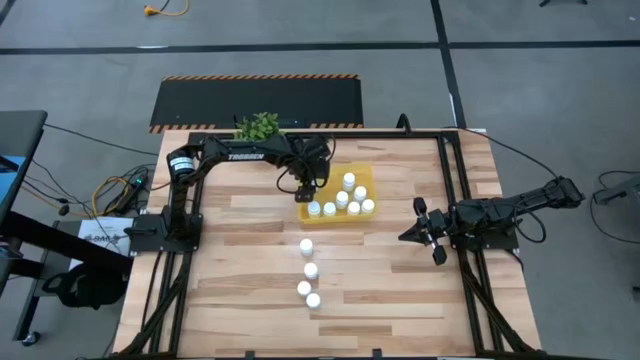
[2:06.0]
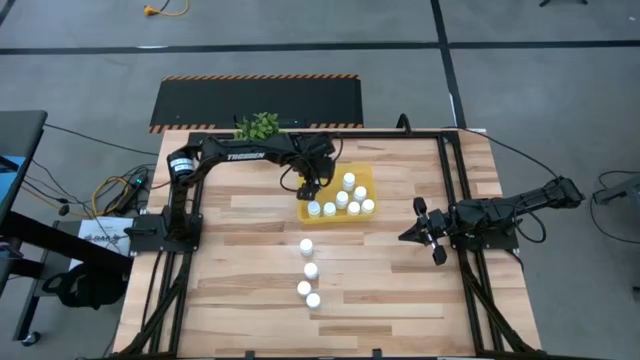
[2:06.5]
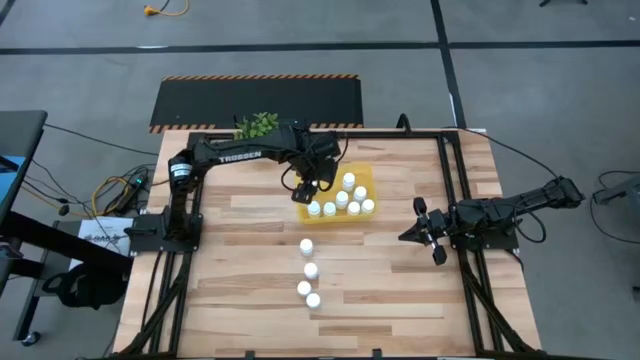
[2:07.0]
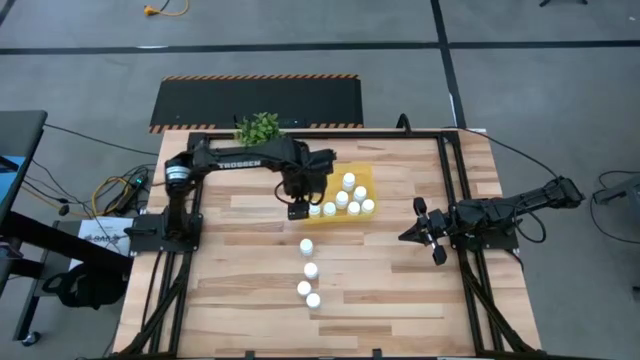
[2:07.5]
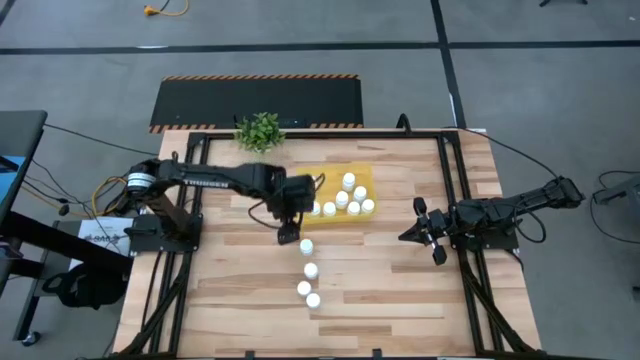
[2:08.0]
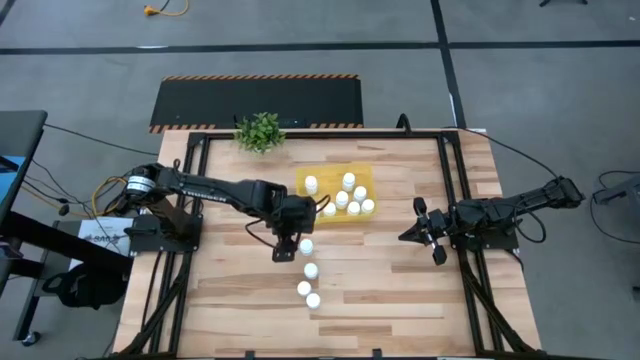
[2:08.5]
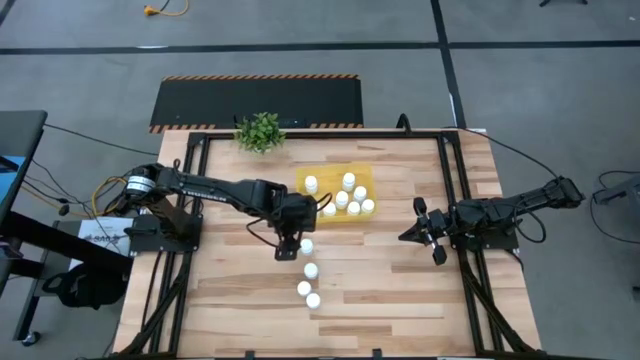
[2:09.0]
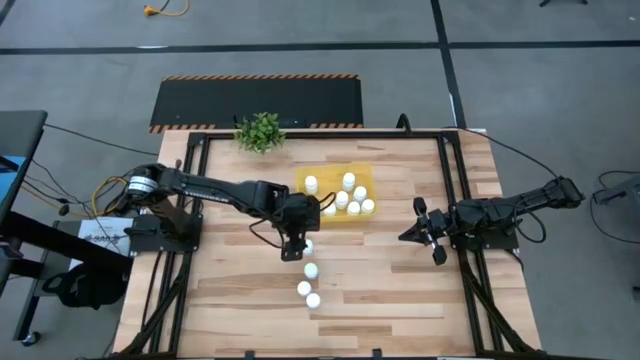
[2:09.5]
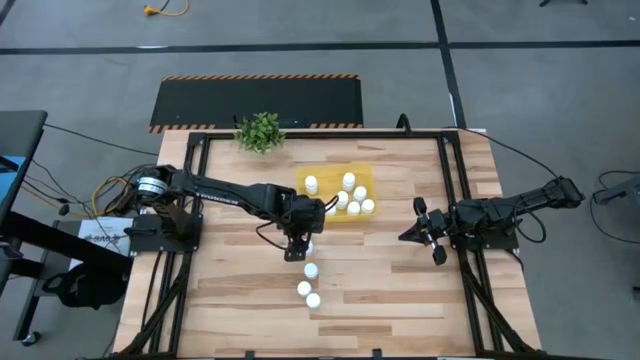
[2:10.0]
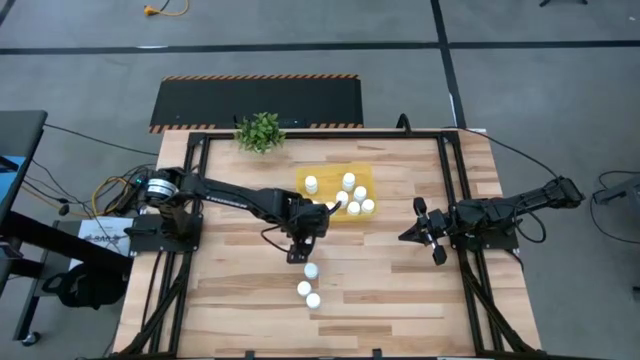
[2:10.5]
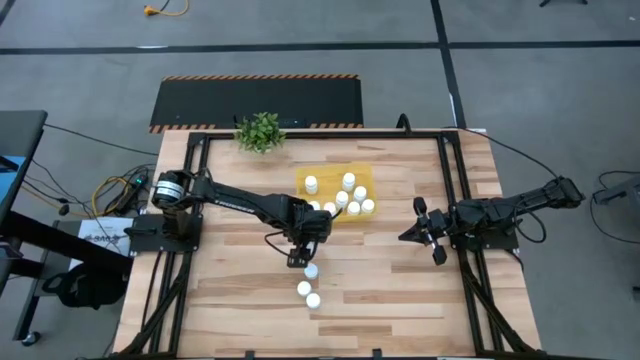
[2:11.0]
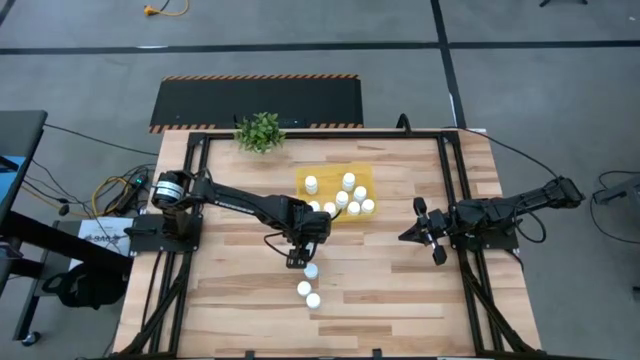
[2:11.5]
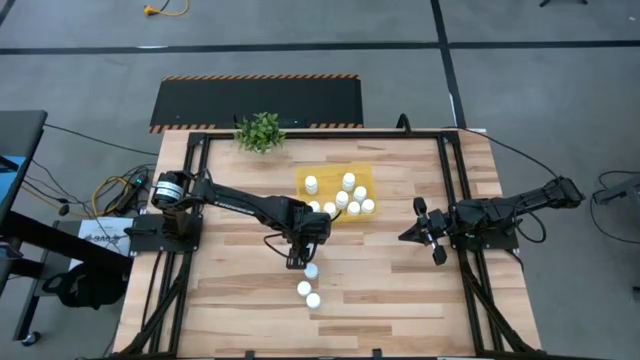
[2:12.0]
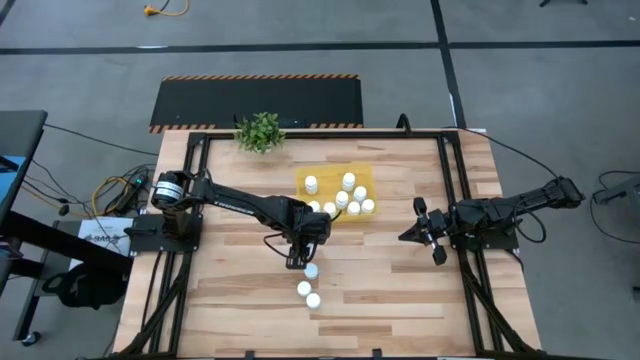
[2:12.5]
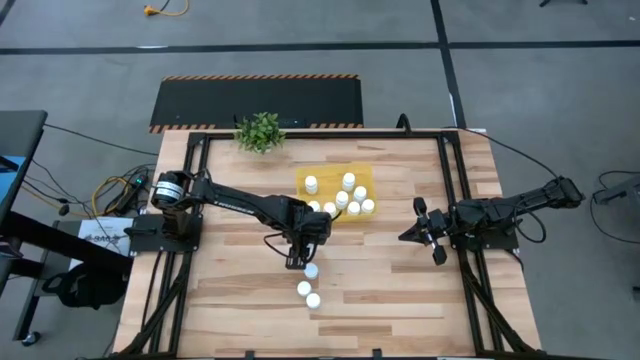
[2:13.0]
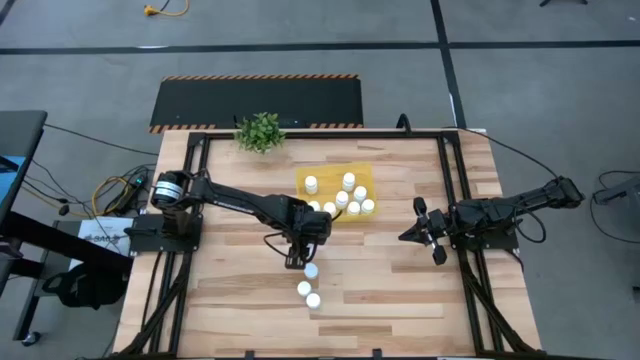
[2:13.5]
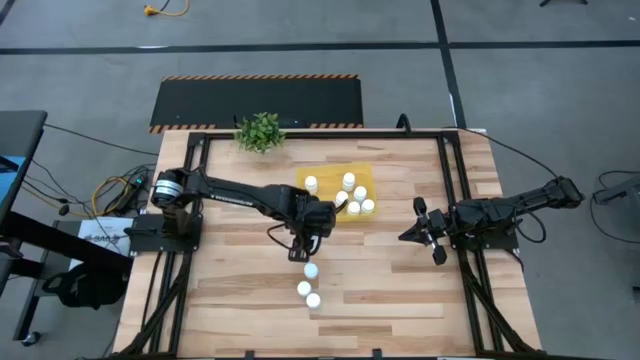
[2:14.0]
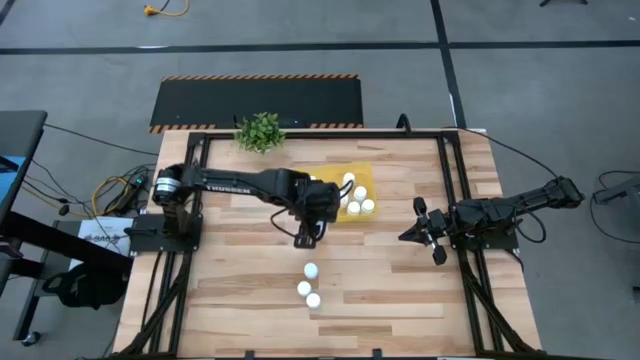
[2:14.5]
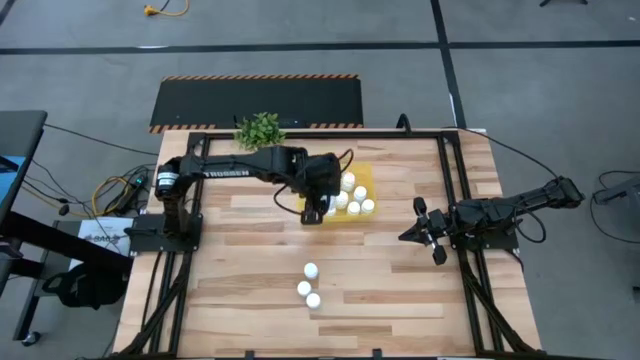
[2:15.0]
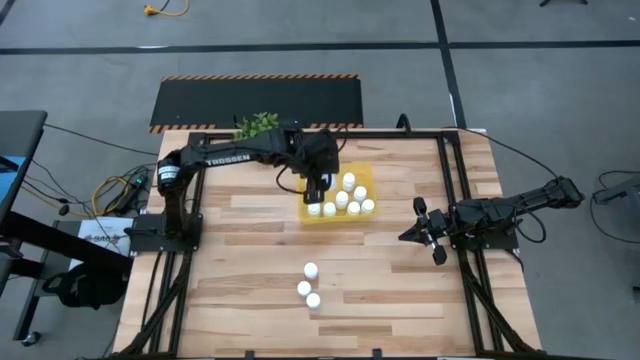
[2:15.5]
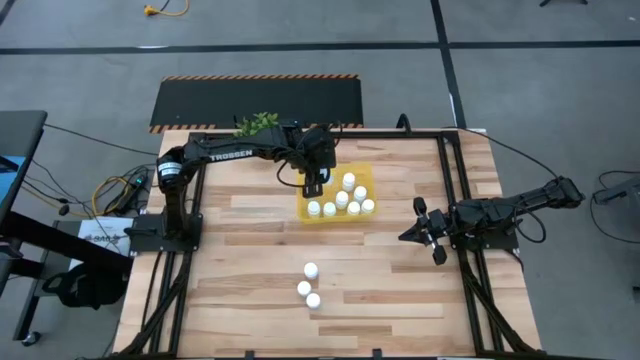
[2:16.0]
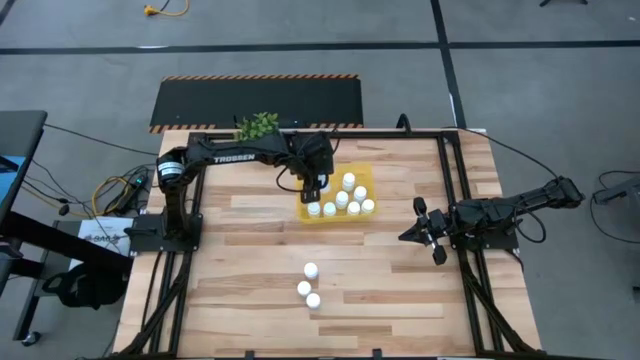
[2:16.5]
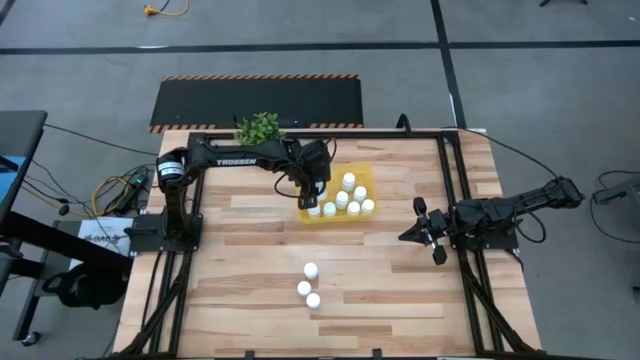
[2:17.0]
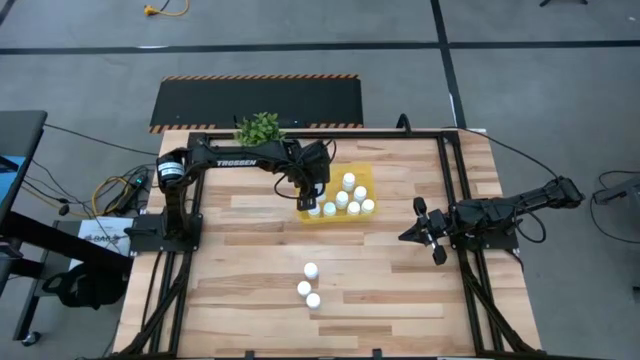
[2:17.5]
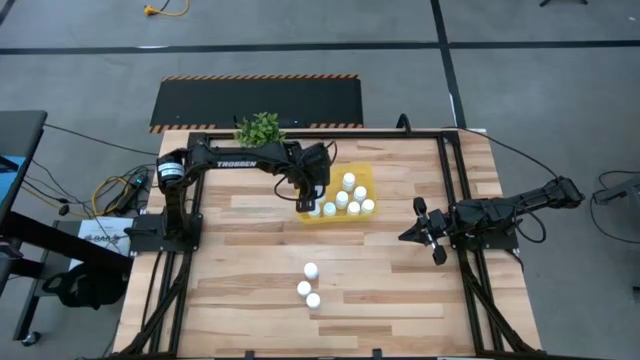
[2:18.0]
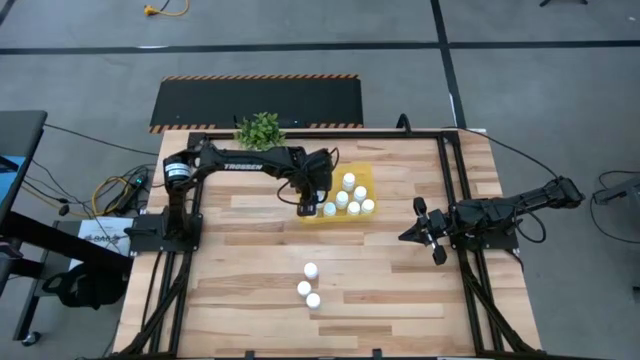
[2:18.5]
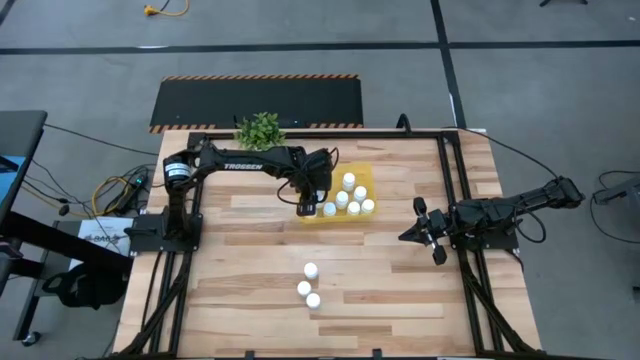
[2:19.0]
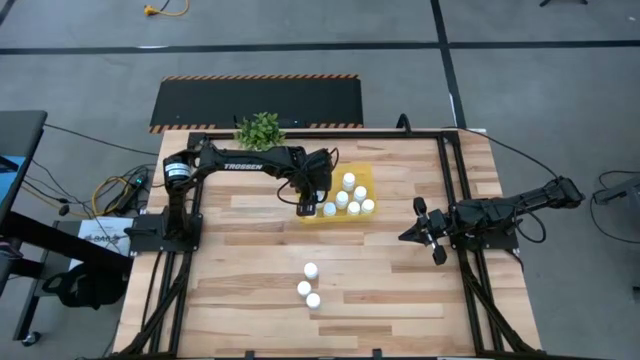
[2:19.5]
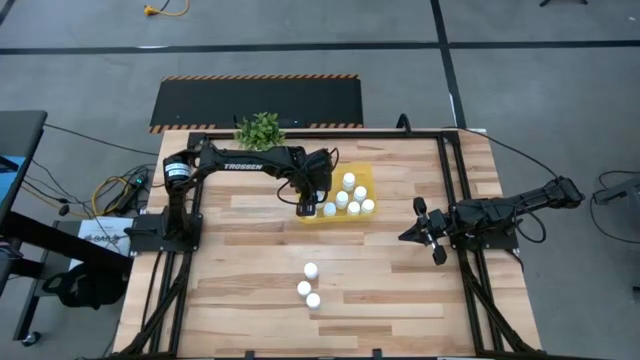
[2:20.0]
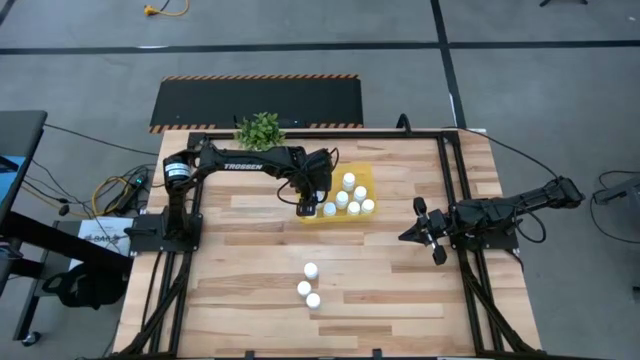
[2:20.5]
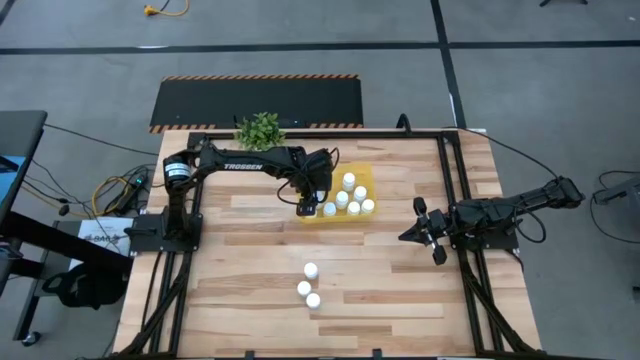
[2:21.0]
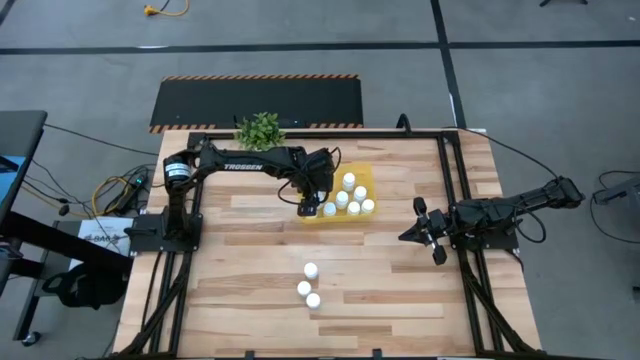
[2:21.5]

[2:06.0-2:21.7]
Task: Pick and place pill bottles into a basket
Put the white medicine bottle into the yellow bin

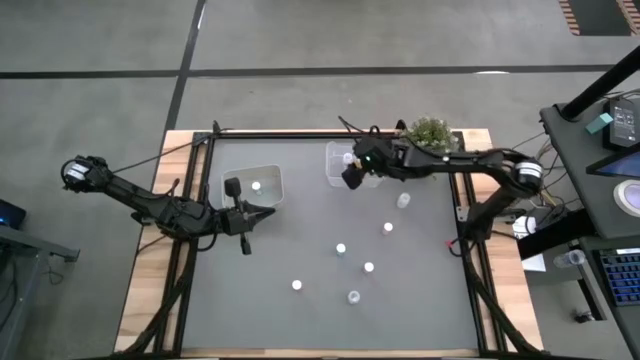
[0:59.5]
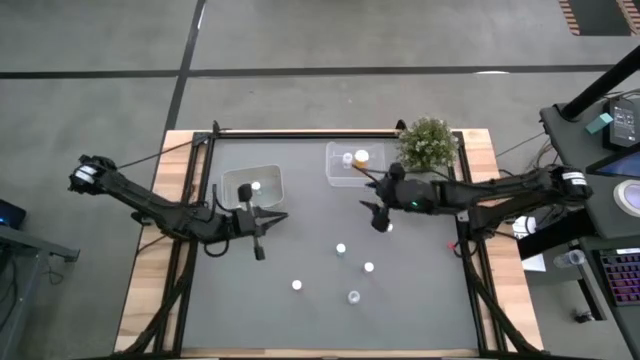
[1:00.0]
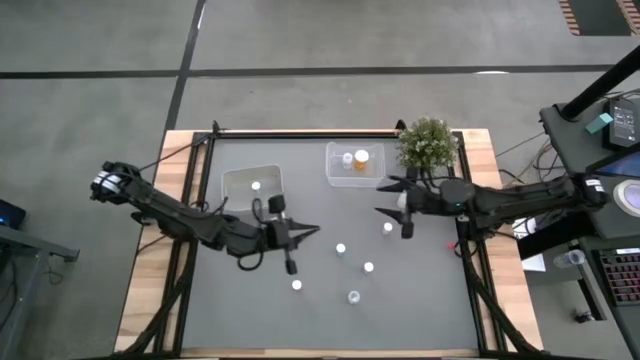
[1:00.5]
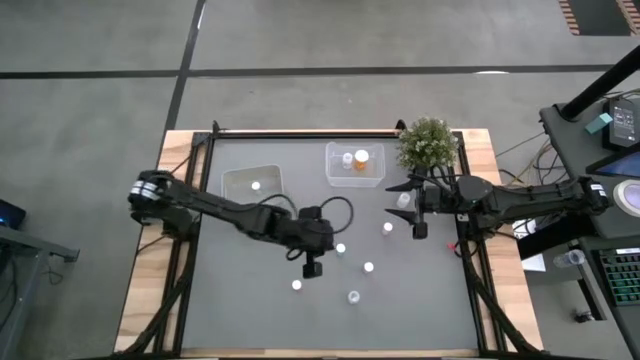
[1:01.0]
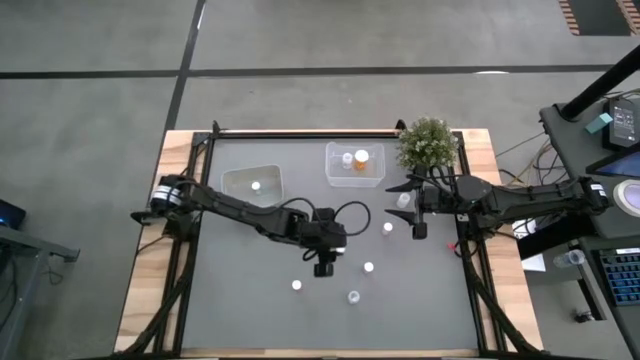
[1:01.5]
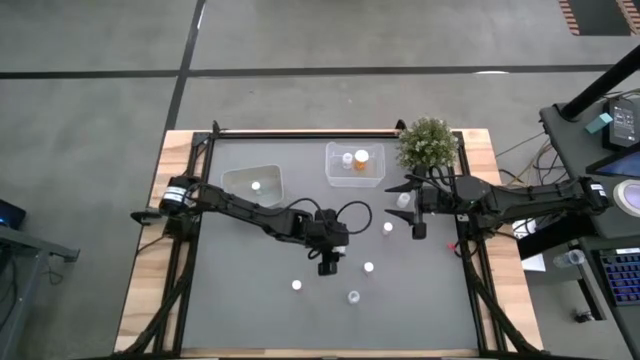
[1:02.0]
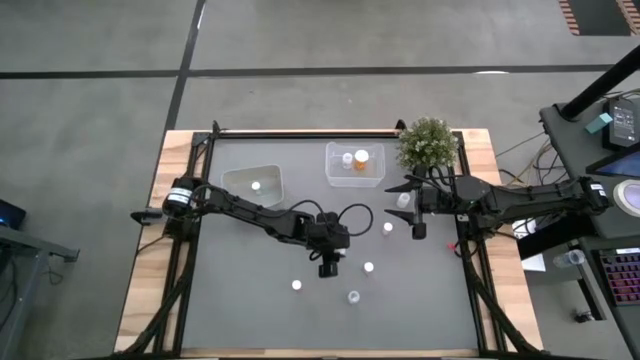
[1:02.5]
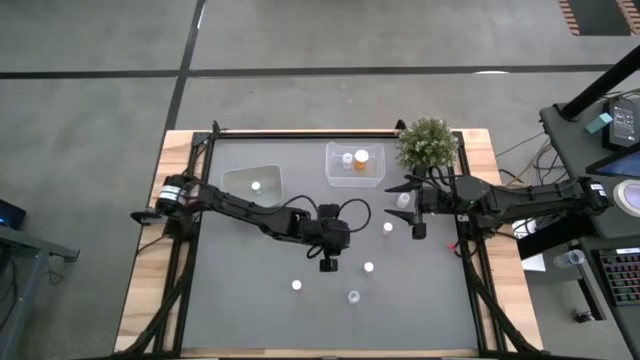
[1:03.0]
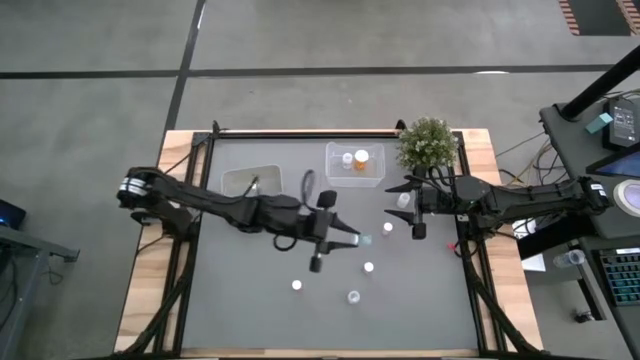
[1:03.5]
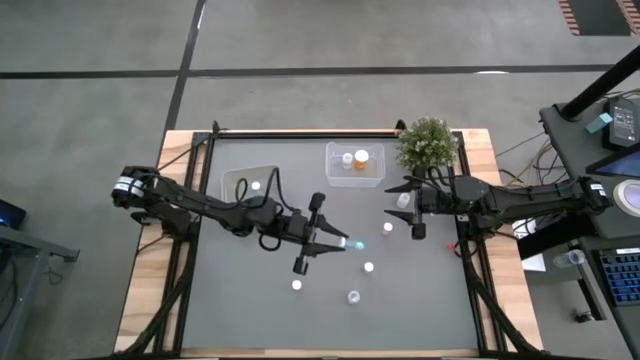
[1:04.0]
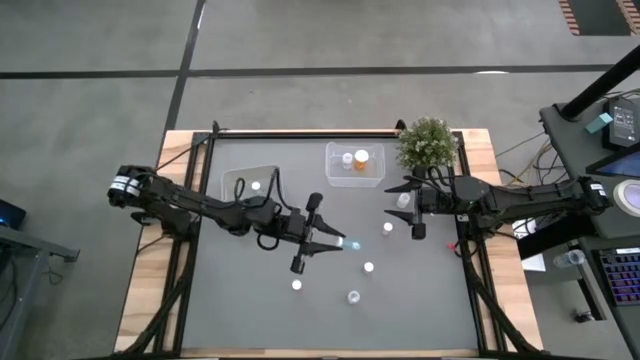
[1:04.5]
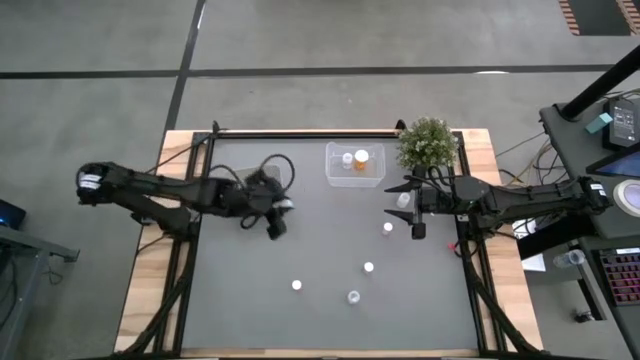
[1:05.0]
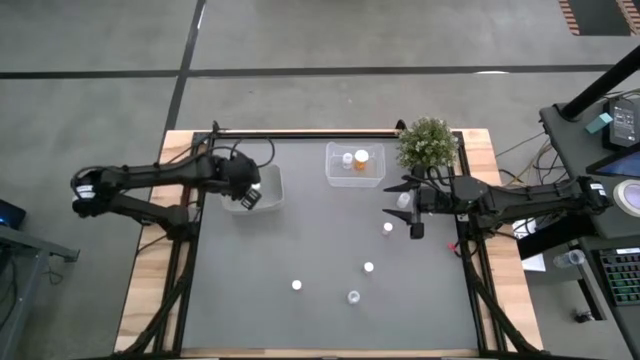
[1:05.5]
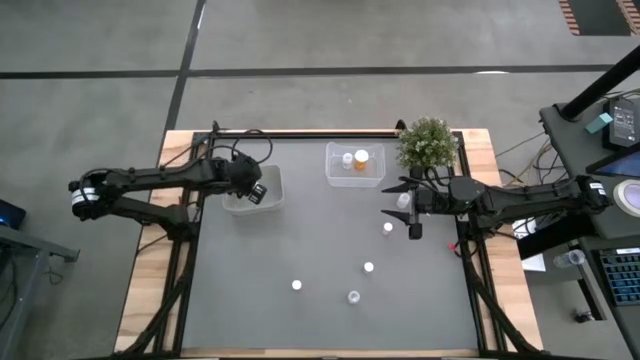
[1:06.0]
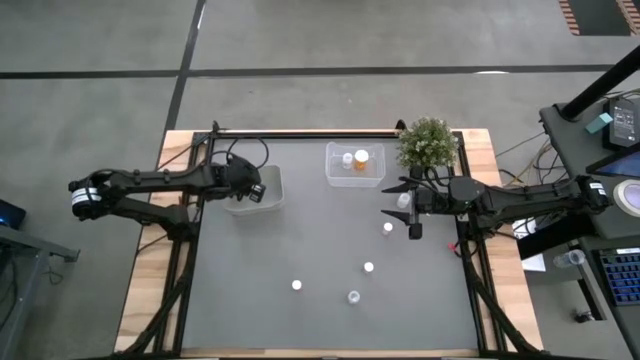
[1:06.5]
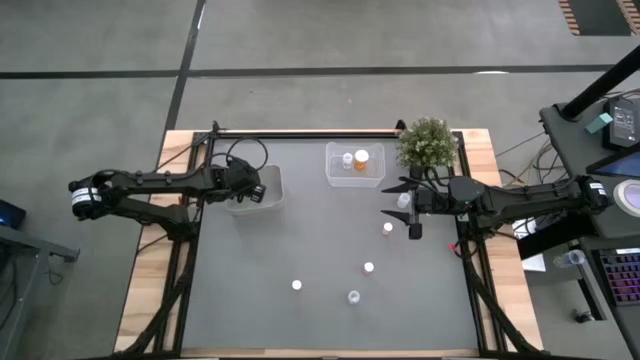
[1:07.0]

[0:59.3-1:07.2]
Task: Pick and place medicine bottles into bin by pill shape (circle, oval)
Put the small blue pill bottle into the gray bin
